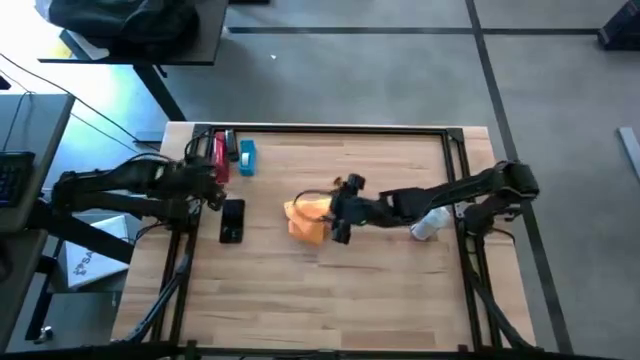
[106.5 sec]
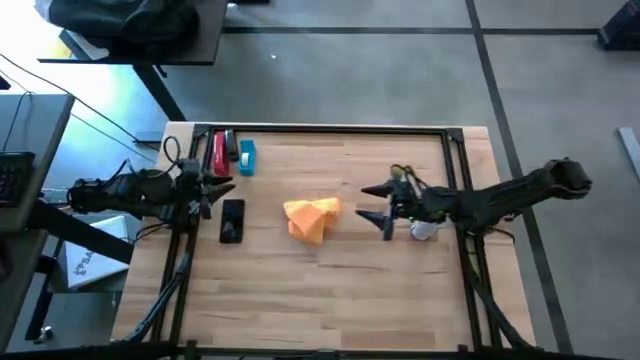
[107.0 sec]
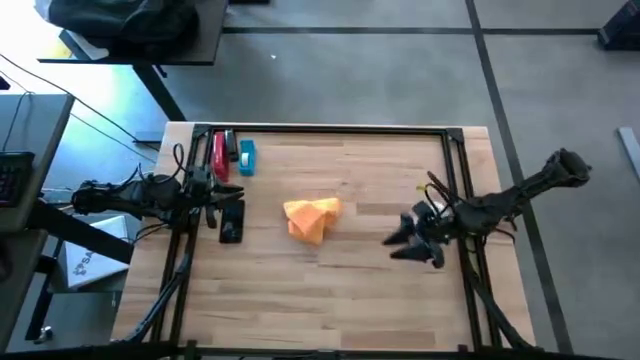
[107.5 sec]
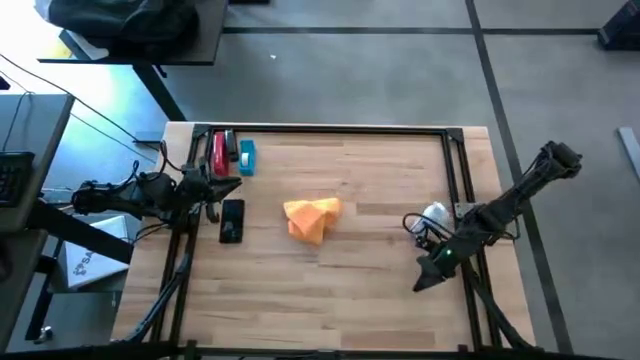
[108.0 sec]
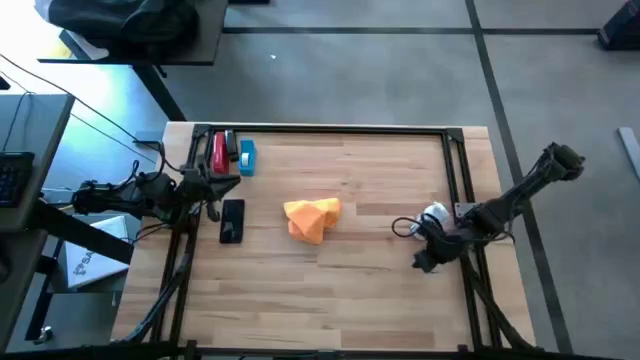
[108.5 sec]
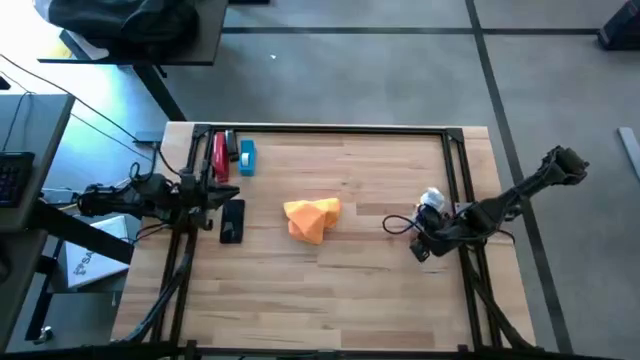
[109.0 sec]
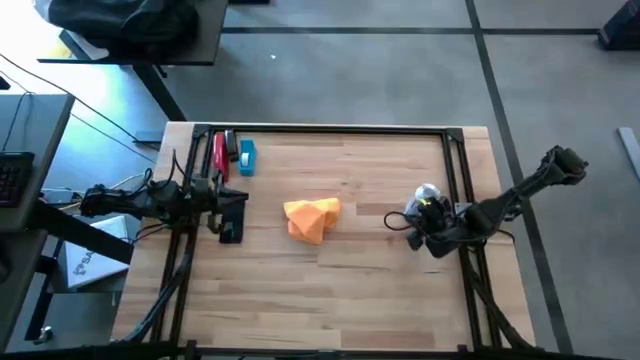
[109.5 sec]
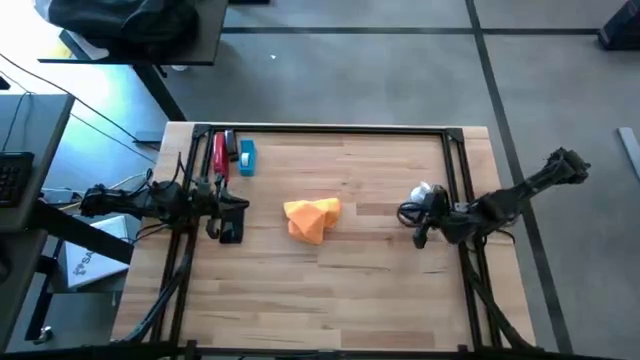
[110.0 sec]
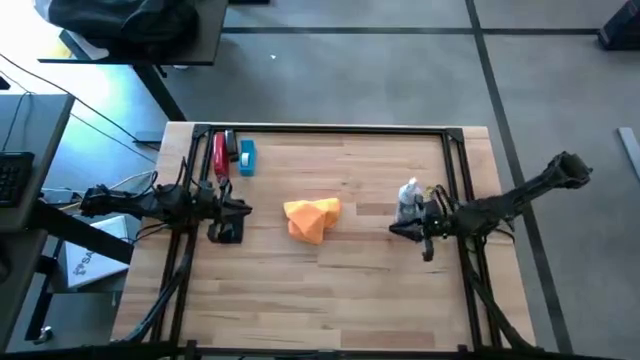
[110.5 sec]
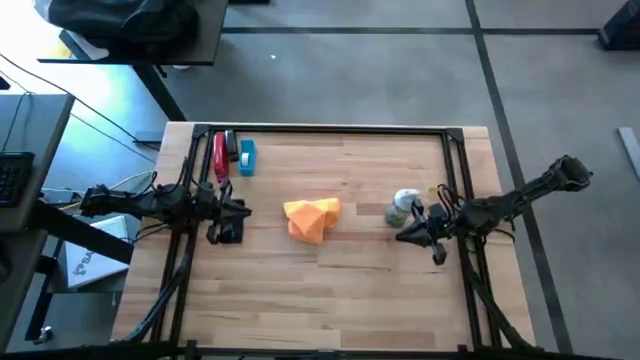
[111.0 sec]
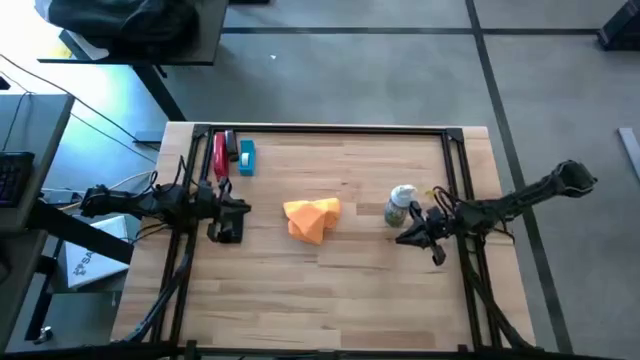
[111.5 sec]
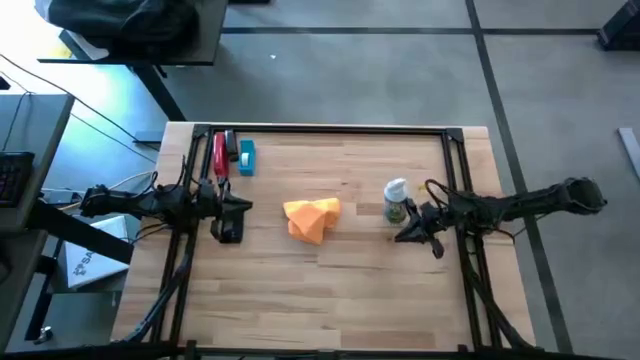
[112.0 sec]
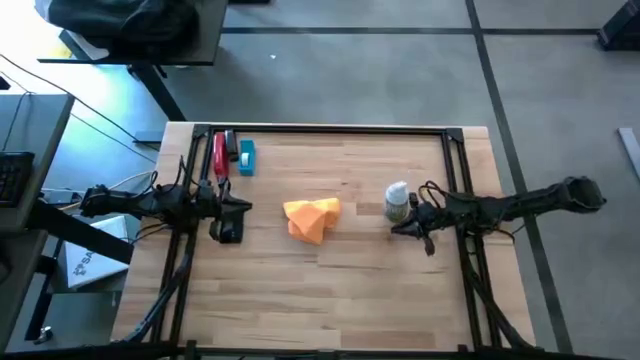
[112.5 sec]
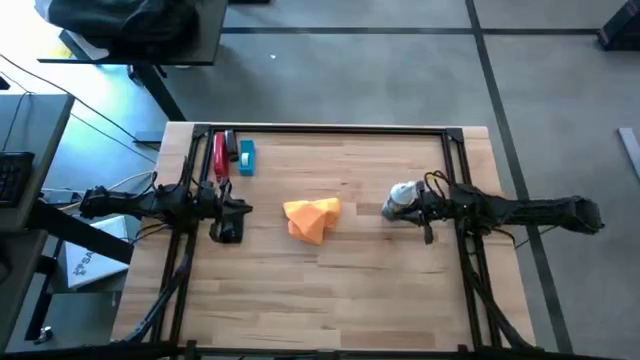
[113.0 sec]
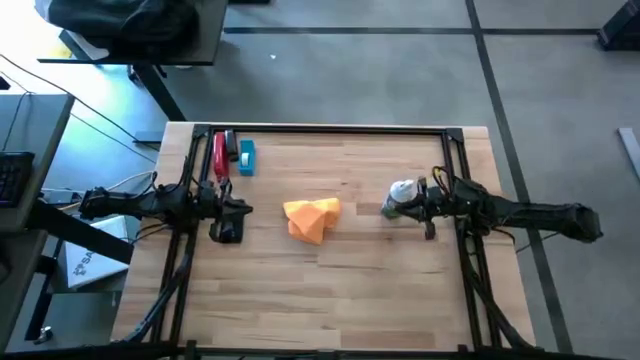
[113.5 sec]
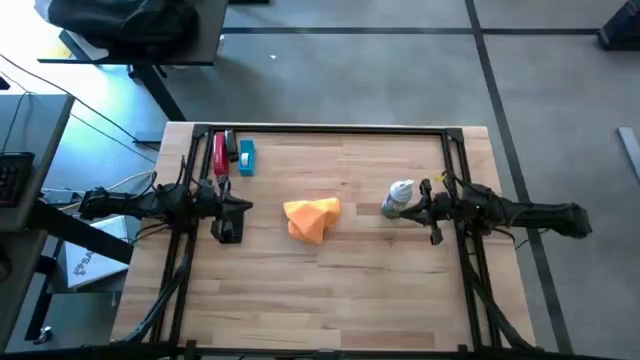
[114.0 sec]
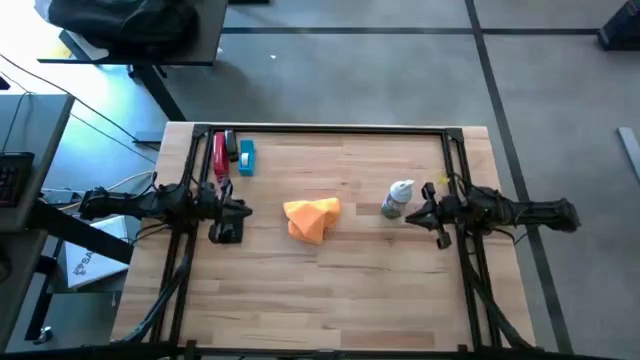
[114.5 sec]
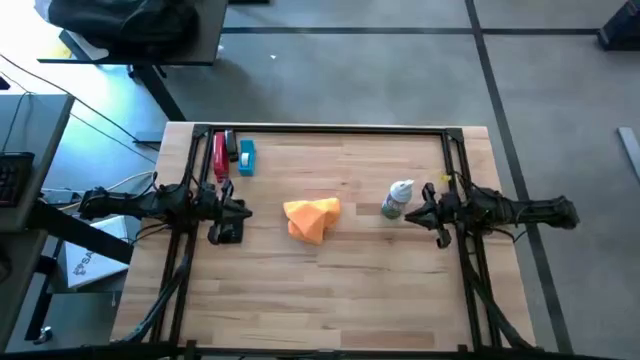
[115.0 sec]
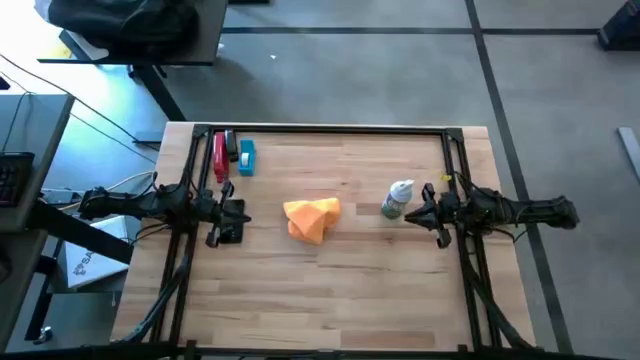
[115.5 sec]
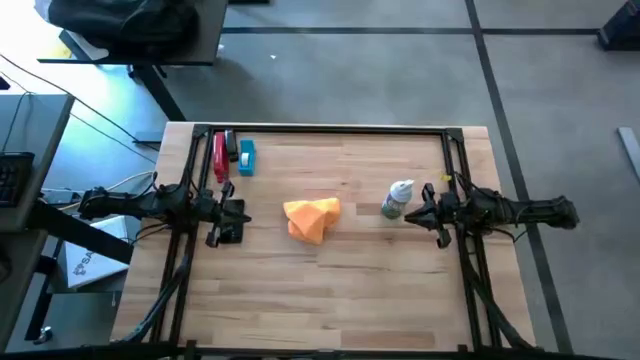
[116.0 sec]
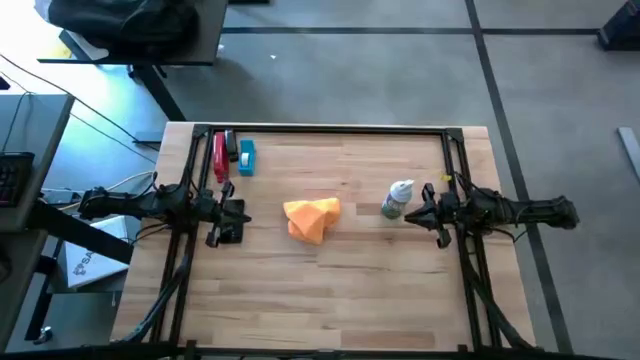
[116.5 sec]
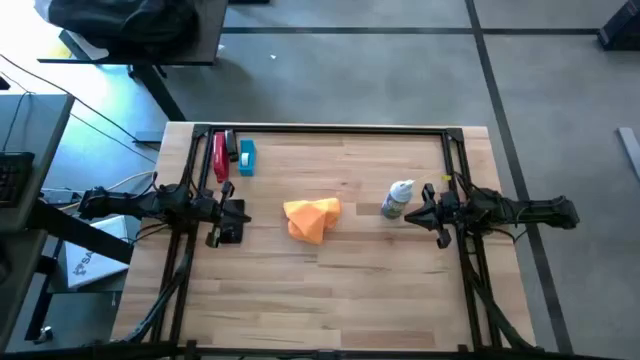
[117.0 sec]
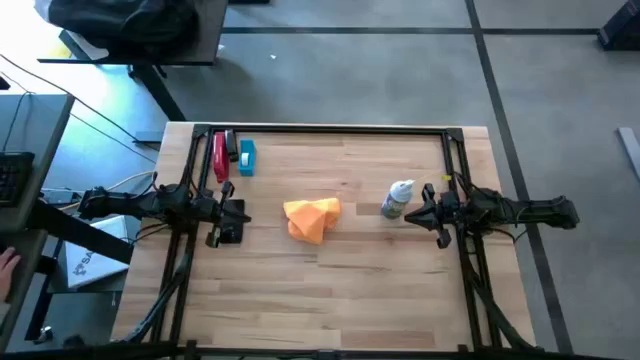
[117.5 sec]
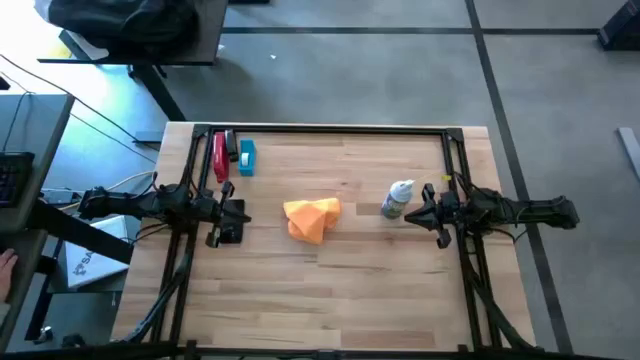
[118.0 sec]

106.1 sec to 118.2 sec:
Task: Apply microfiber cloth
Return to Home Position

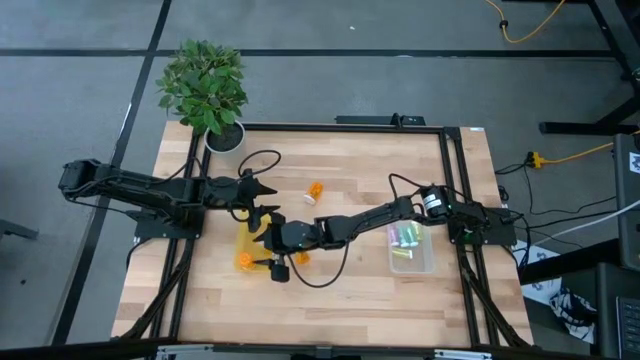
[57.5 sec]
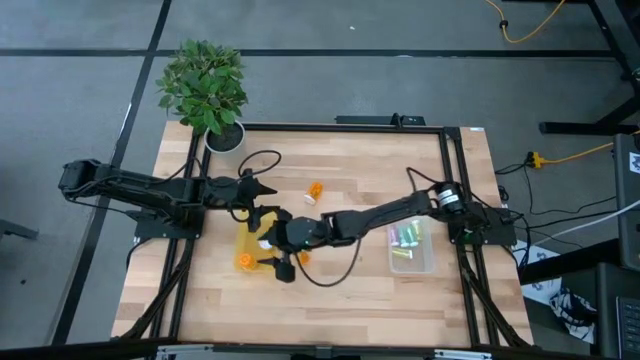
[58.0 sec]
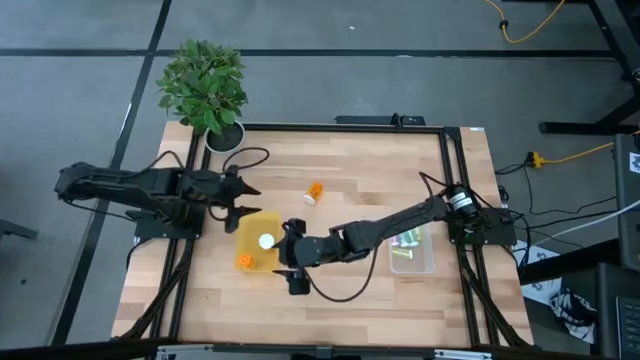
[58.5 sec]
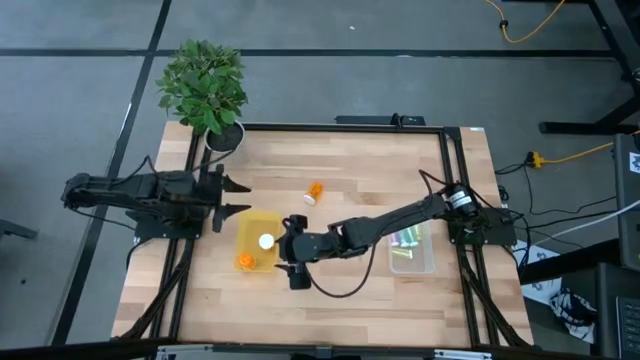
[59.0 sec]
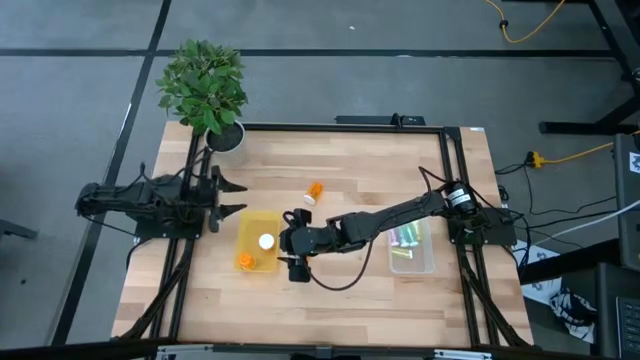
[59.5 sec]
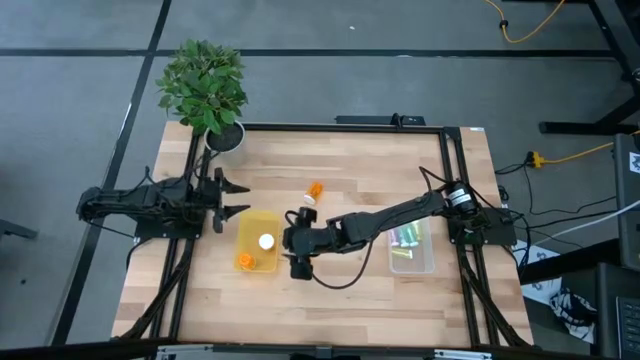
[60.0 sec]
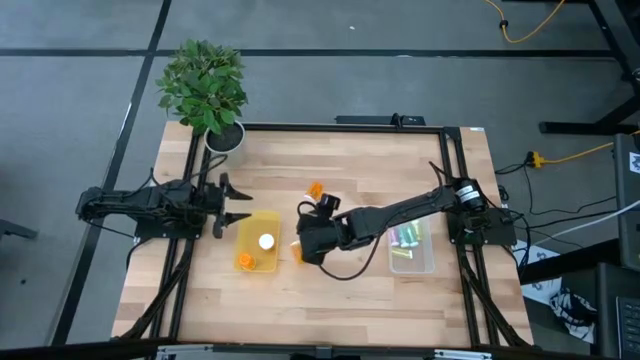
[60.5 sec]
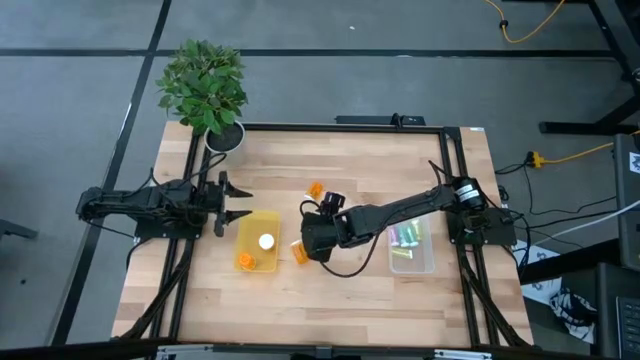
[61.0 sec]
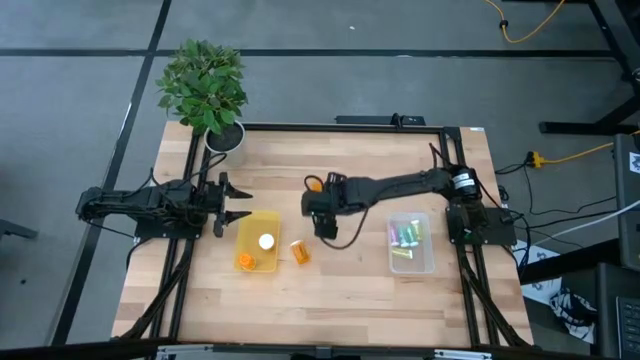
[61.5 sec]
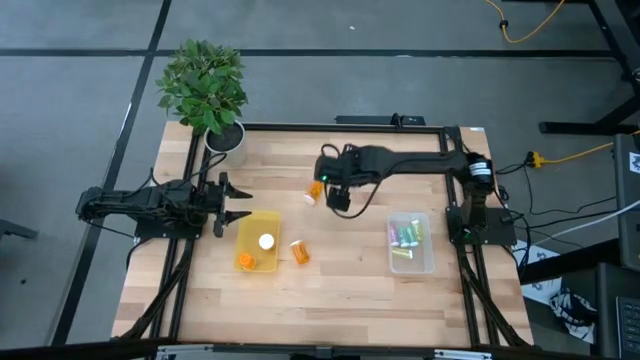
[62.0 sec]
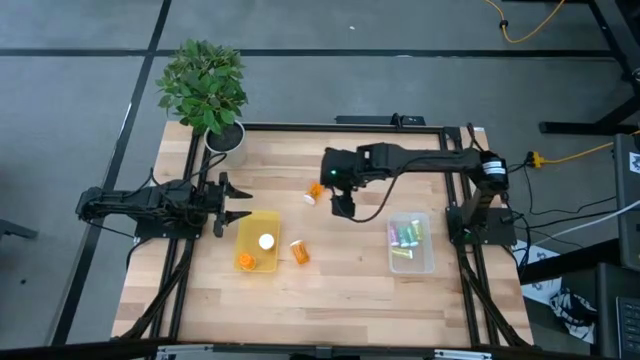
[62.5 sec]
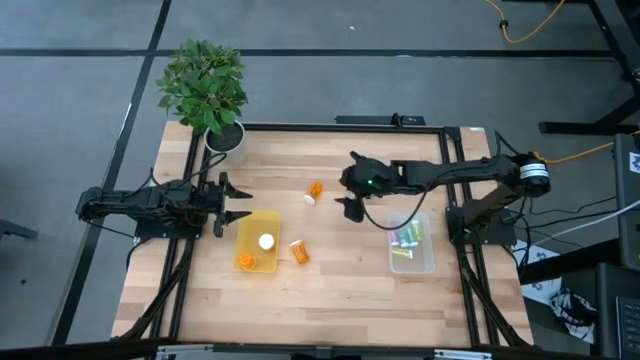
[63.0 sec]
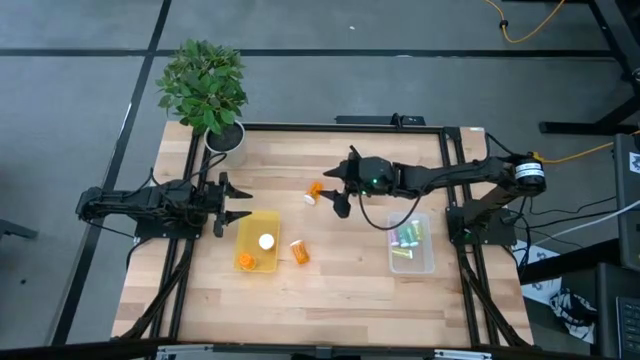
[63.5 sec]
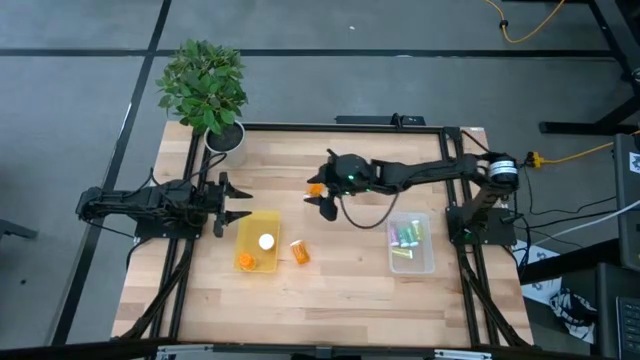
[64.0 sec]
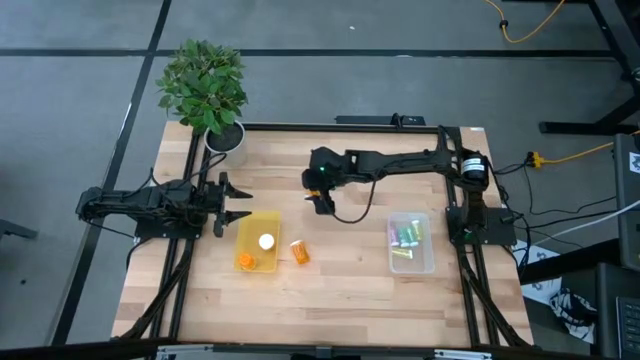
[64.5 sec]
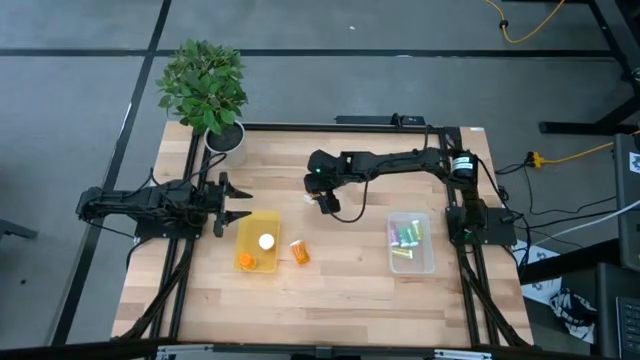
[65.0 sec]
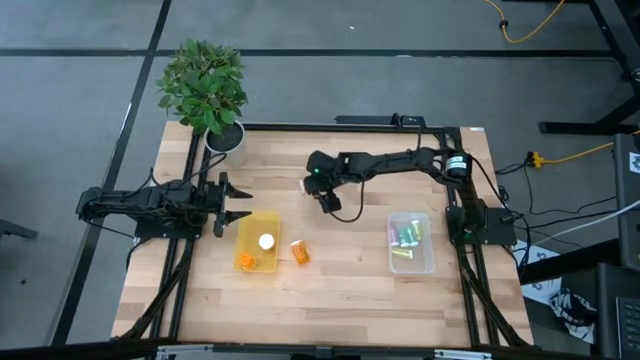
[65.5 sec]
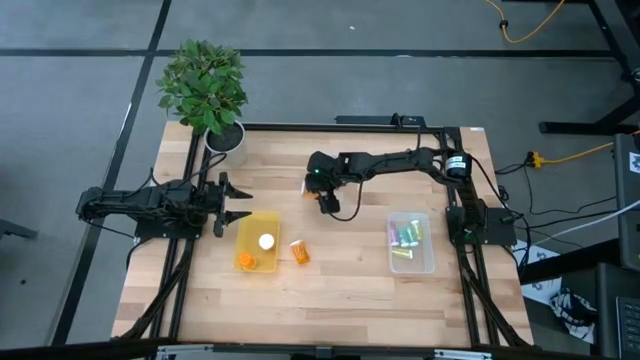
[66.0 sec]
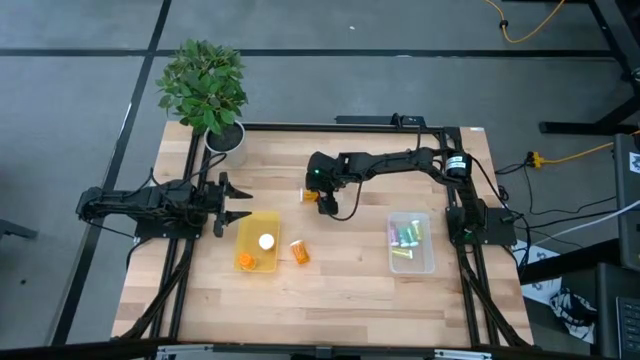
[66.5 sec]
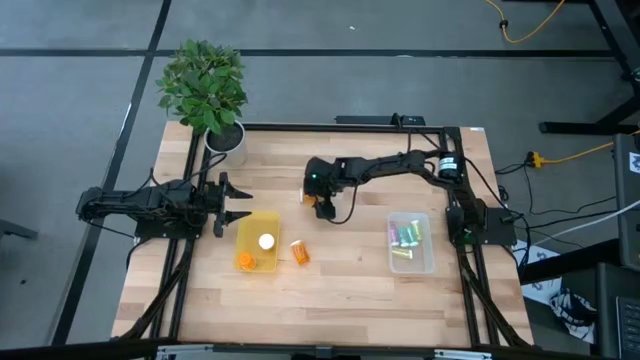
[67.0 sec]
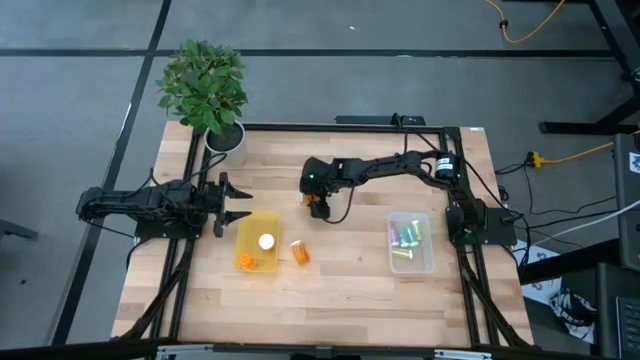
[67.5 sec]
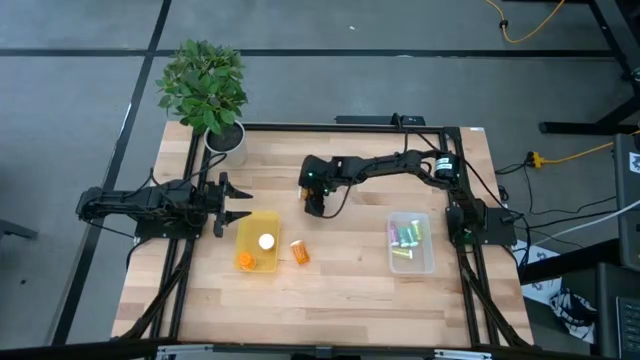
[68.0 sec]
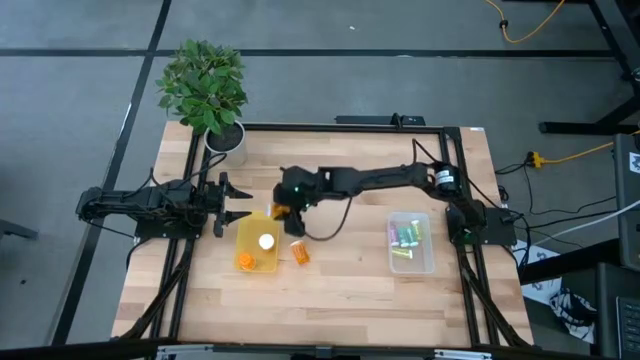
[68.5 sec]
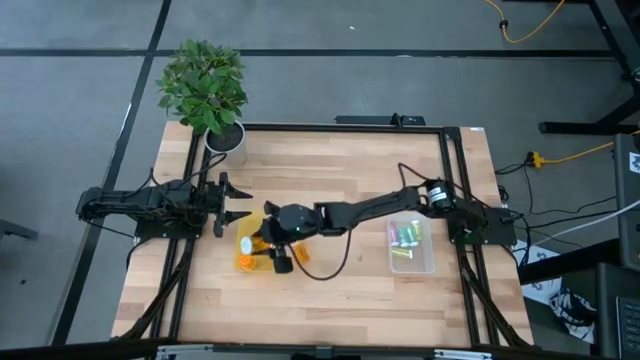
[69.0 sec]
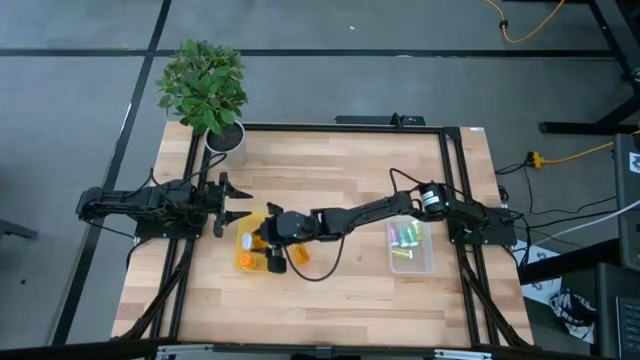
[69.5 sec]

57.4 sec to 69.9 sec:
Task: Pick and place medicine bottles into bin by pill shape (circle, oval)
Put the orange pill bottle into the yellow bin
